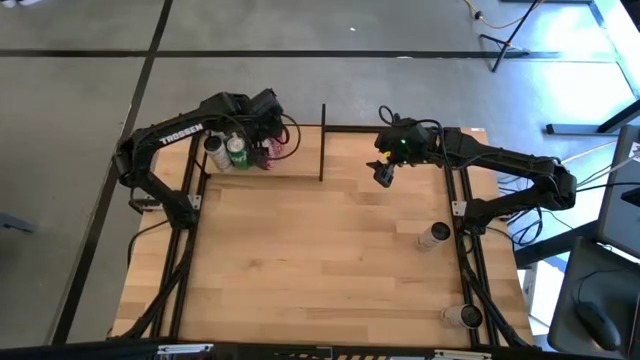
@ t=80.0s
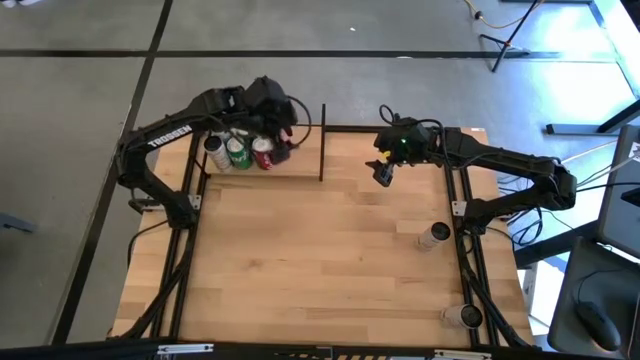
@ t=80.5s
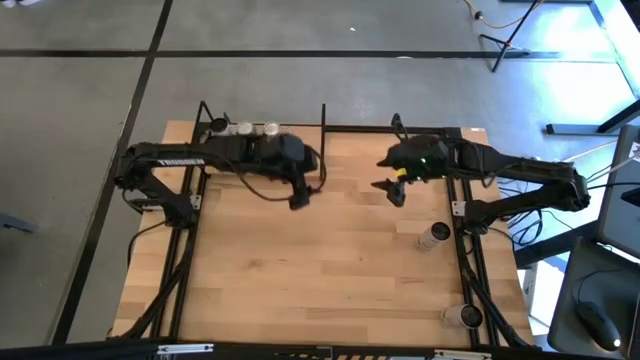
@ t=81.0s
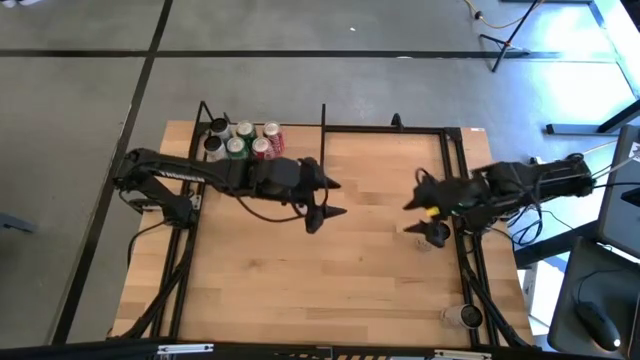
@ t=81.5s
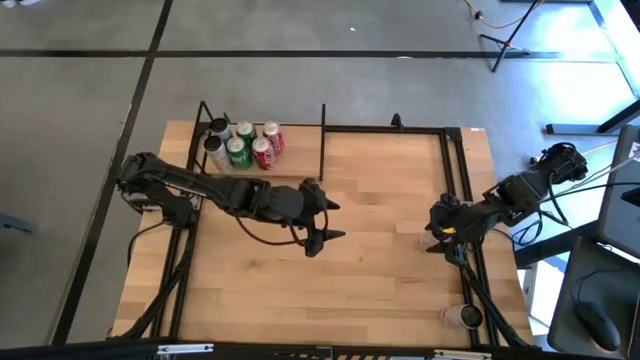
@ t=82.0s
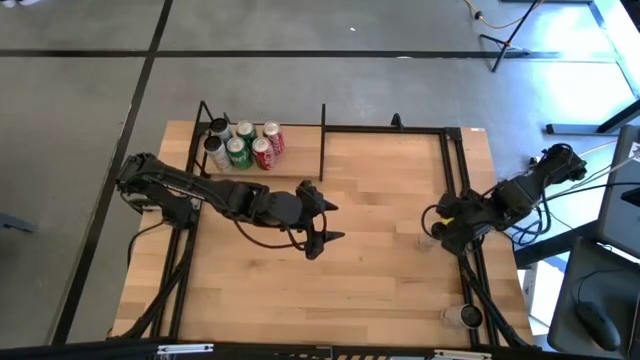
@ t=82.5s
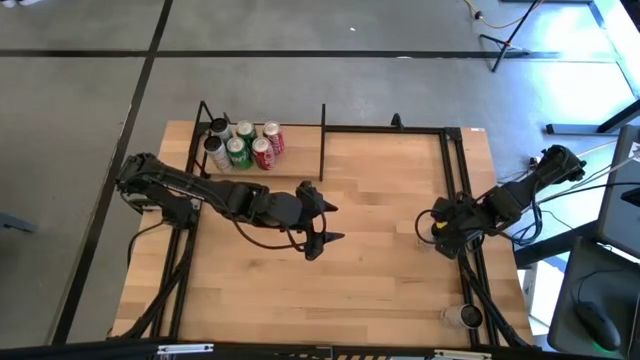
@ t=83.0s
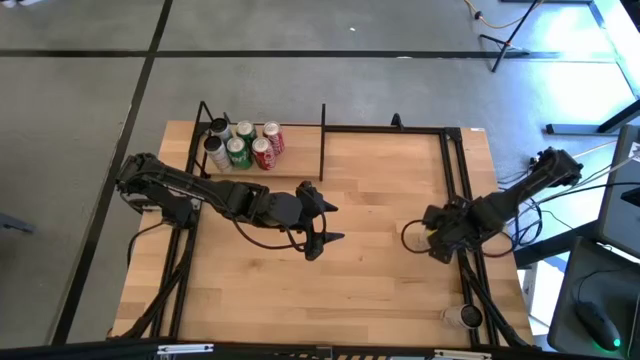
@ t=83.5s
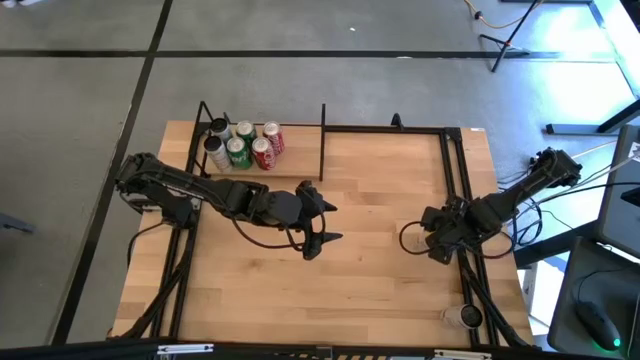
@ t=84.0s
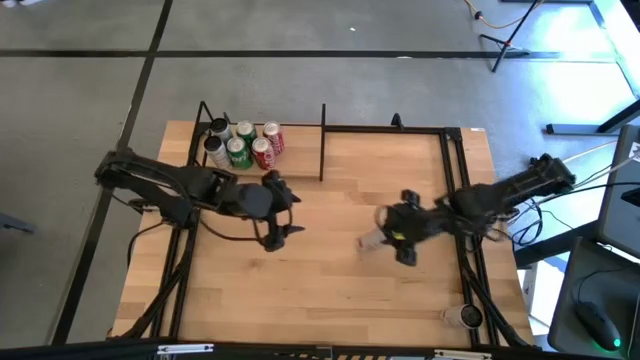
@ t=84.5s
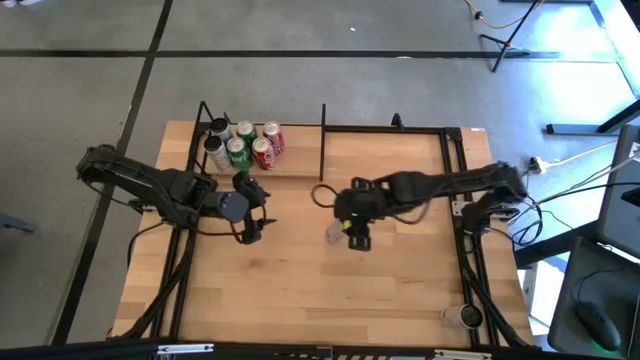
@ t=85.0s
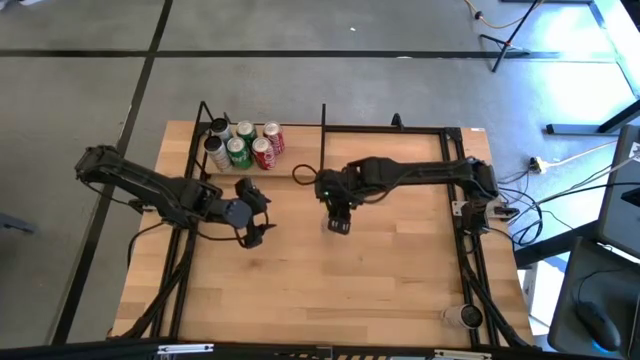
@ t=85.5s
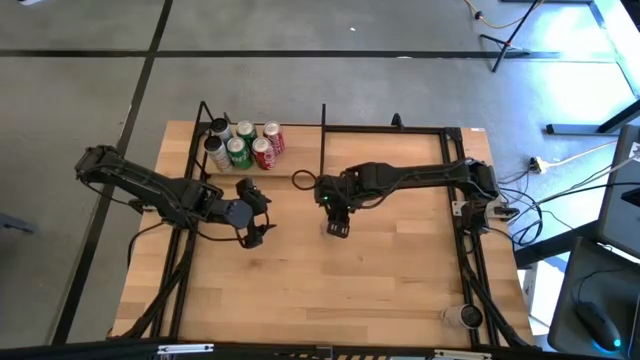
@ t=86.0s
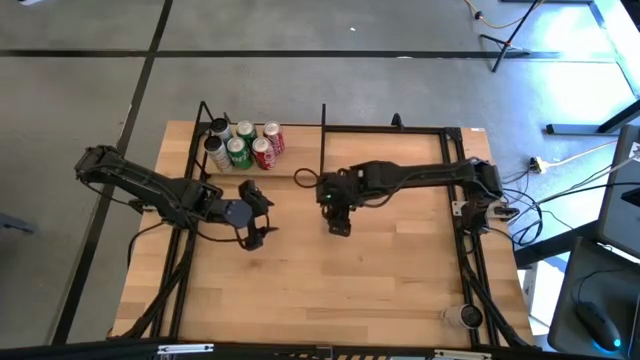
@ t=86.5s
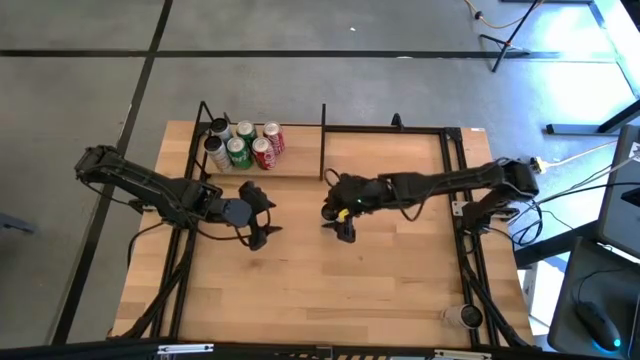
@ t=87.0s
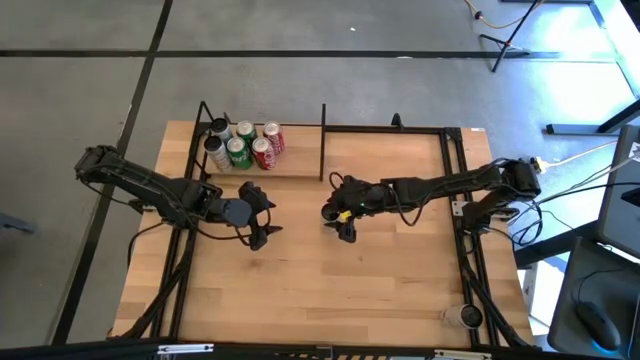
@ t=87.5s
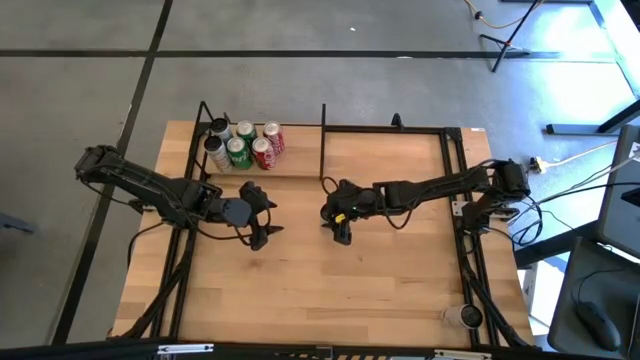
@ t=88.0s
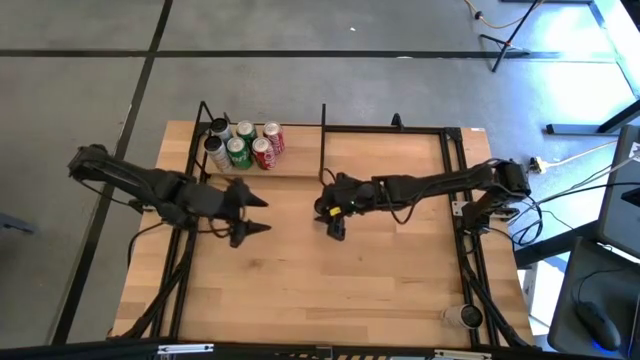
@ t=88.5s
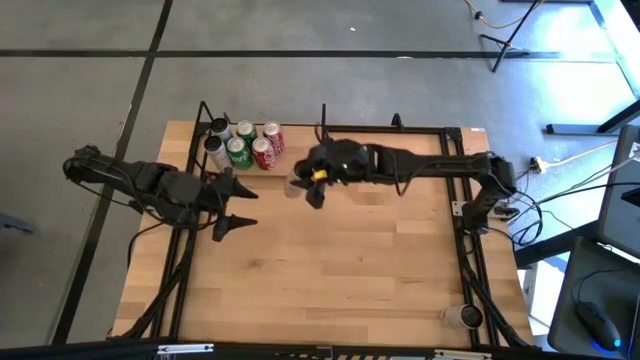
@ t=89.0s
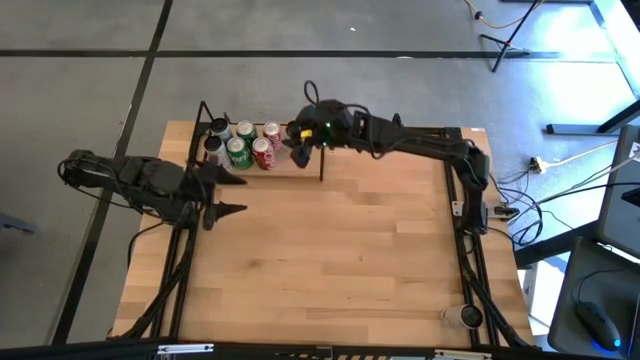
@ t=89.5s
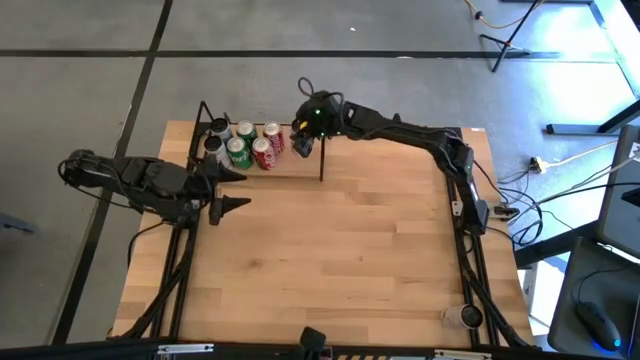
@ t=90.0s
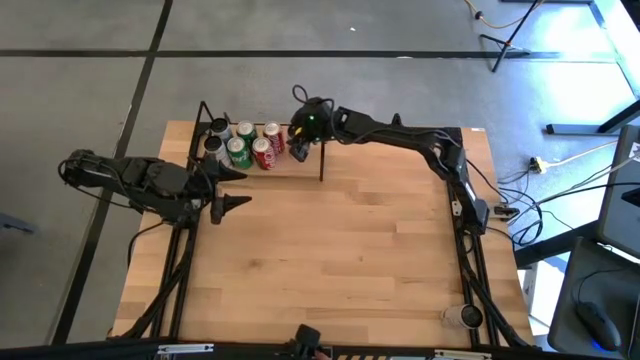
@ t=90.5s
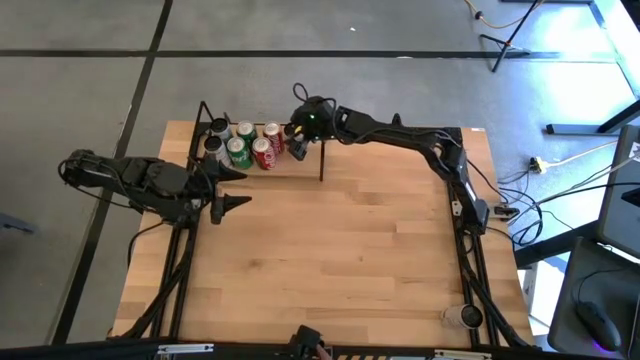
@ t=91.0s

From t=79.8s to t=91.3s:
Task: Place canned beverage on shelf
Put the top white-pink soda can on the shelf

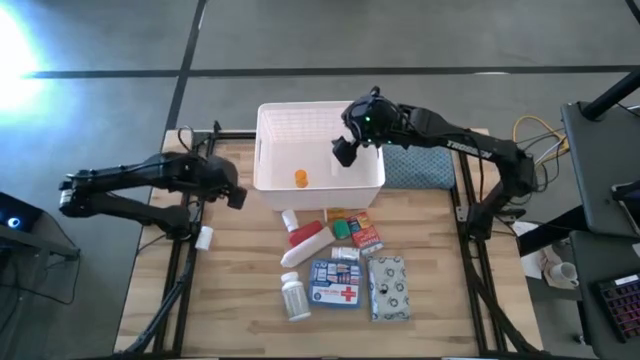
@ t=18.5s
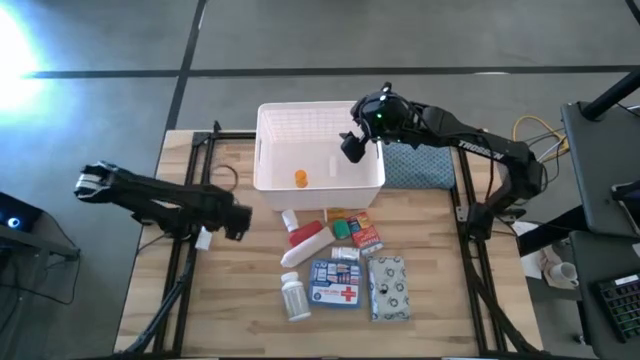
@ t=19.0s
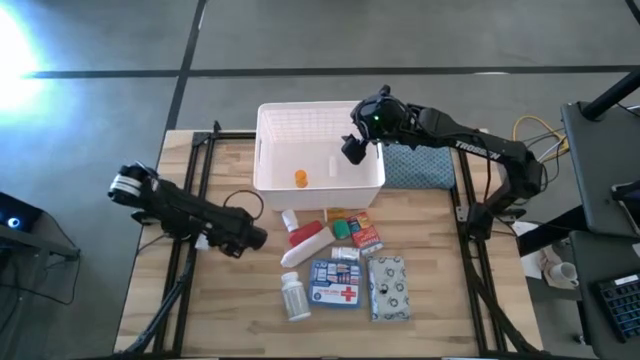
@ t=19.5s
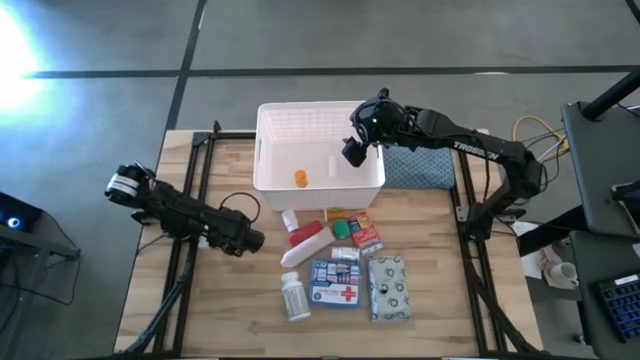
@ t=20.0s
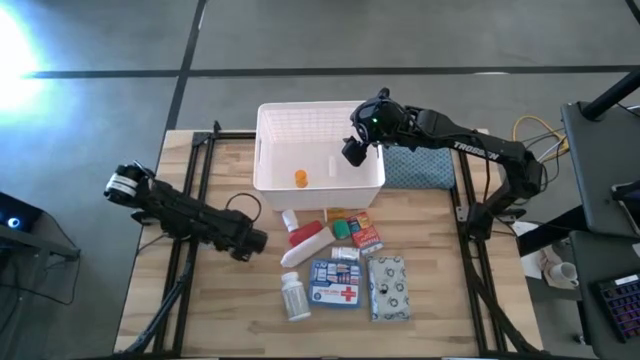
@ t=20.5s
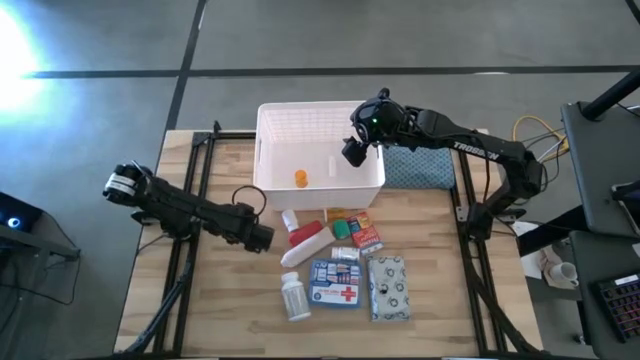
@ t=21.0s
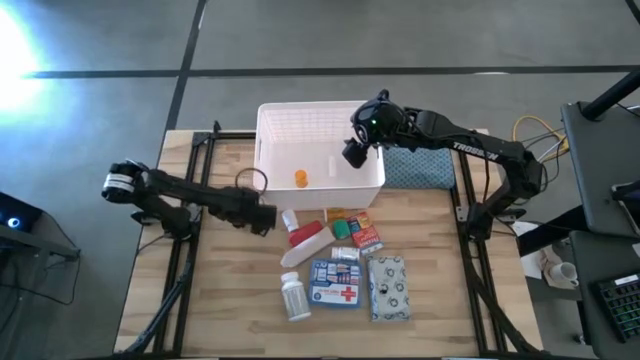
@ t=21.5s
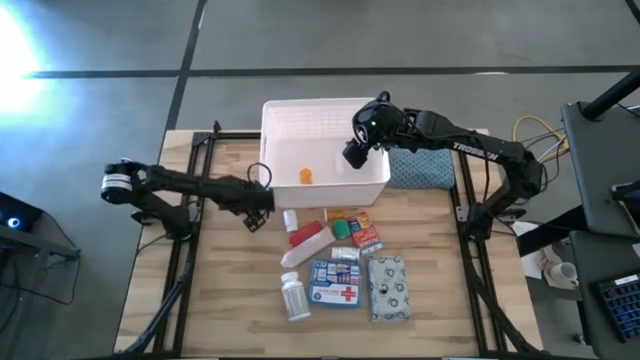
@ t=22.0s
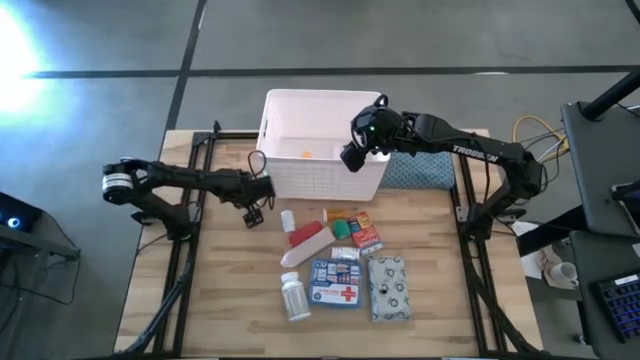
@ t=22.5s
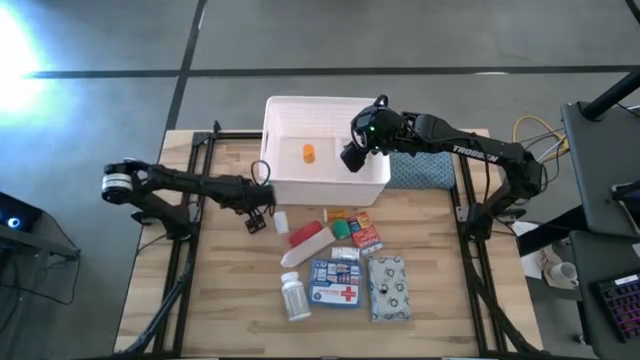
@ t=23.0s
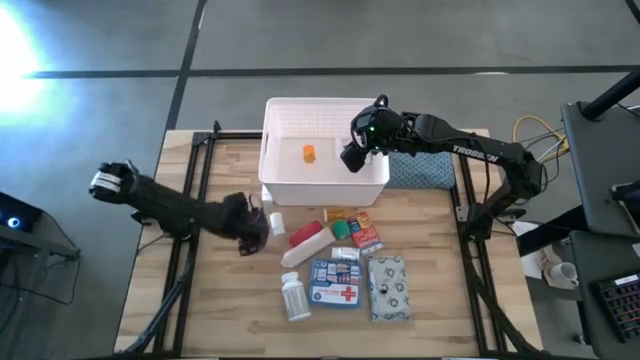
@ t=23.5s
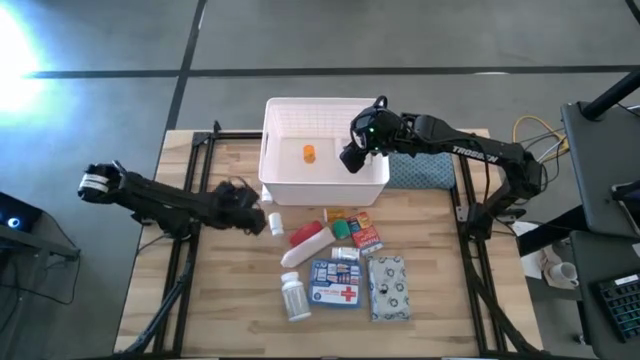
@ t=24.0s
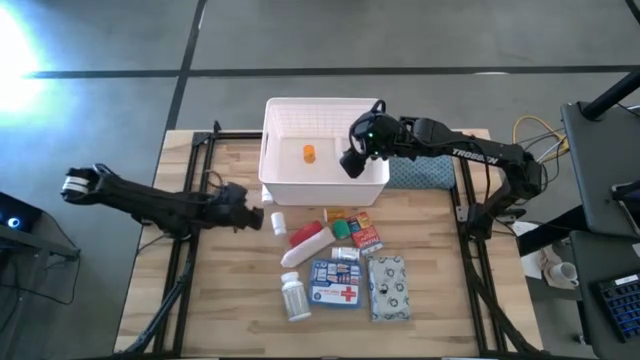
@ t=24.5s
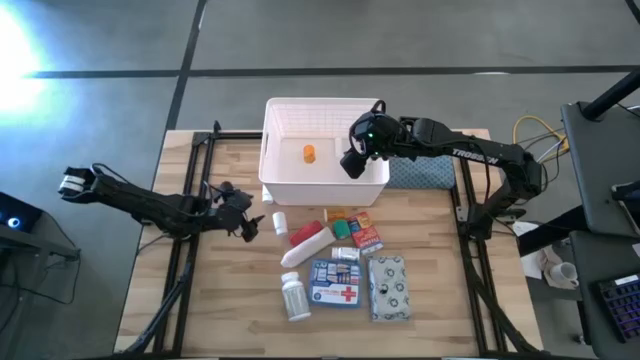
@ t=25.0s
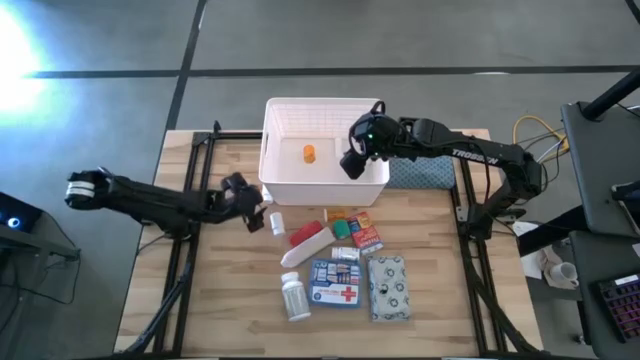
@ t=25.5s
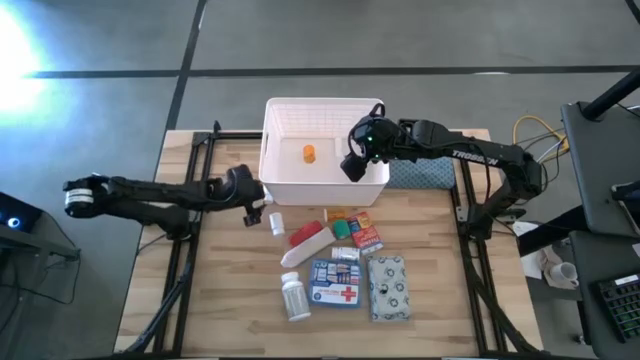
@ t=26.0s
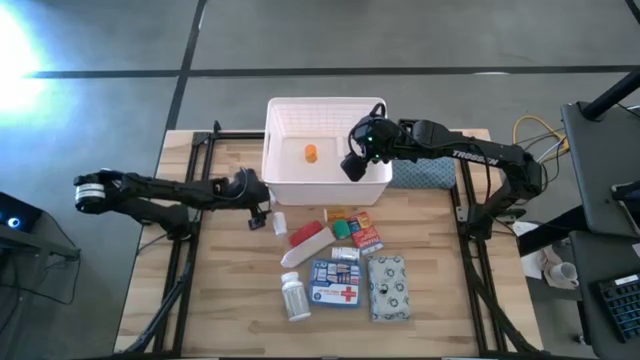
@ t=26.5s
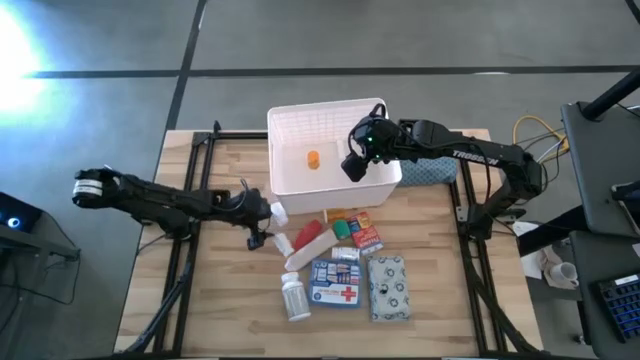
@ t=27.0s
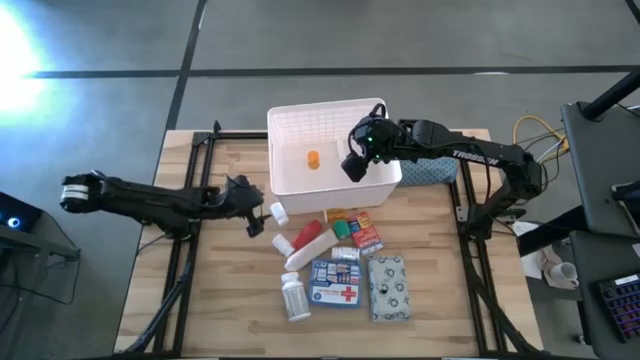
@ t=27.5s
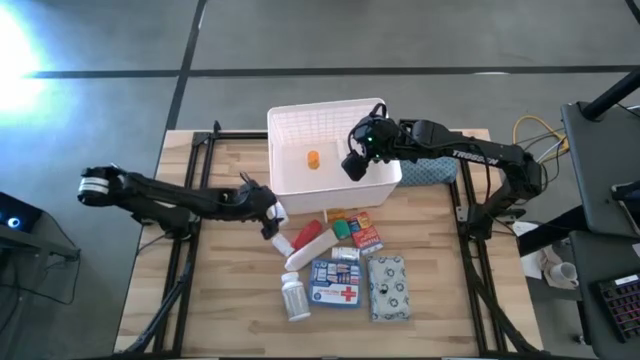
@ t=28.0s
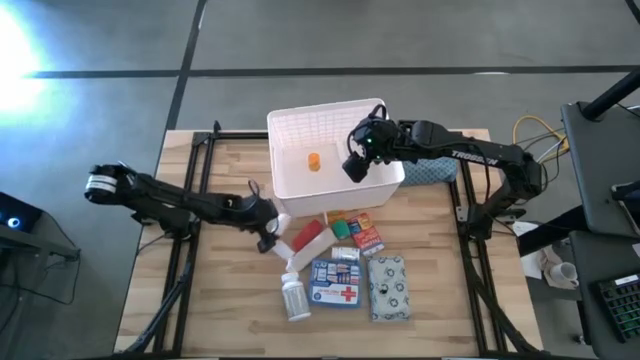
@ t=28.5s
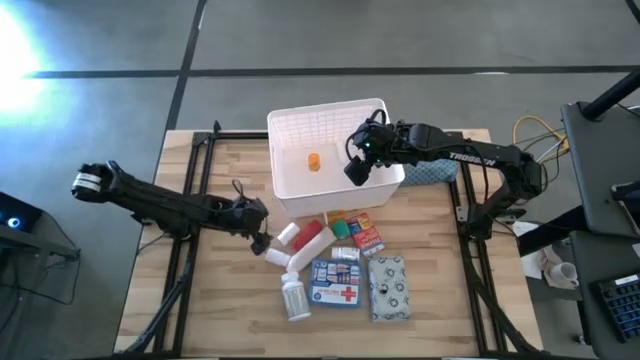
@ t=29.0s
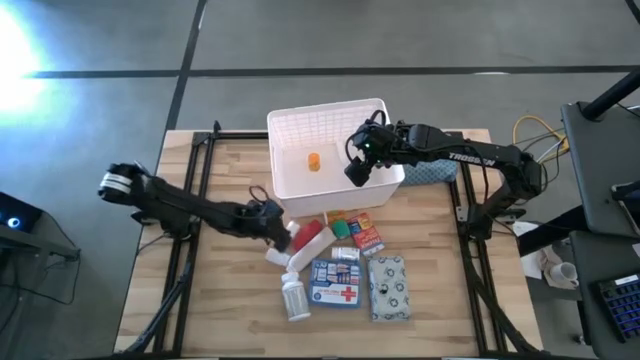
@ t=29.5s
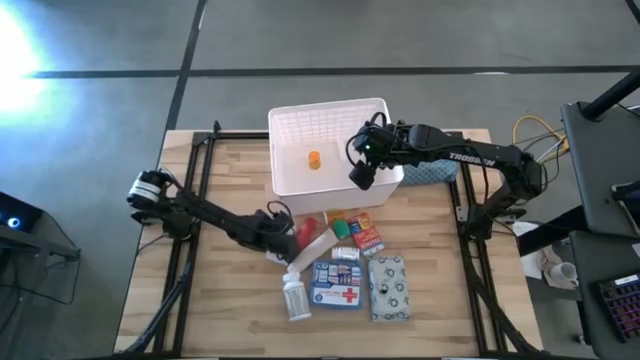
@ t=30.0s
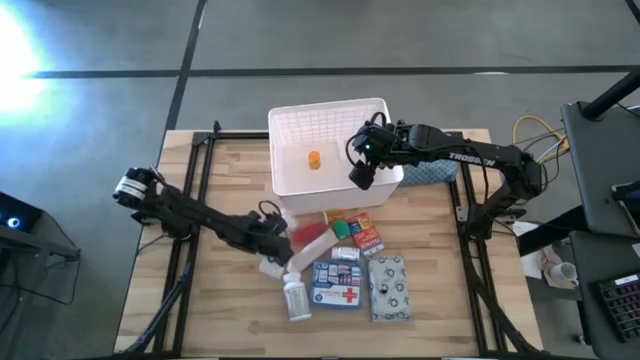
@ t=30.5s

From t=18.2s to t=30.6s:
Task: Pick & place medical supplies in basket/bin
Put the white pill bottle into the white container
